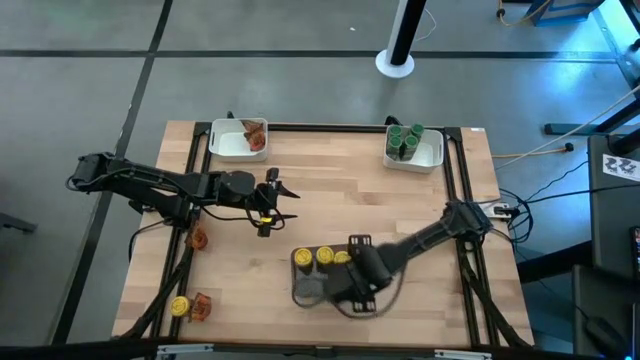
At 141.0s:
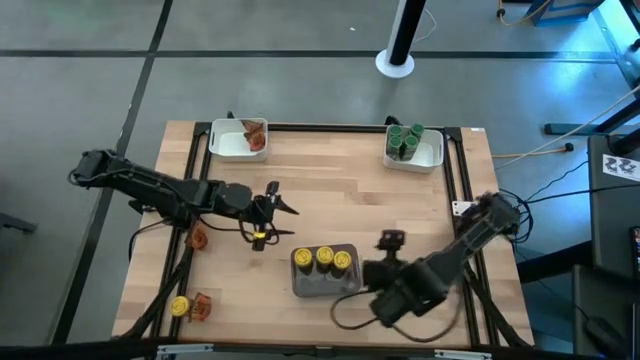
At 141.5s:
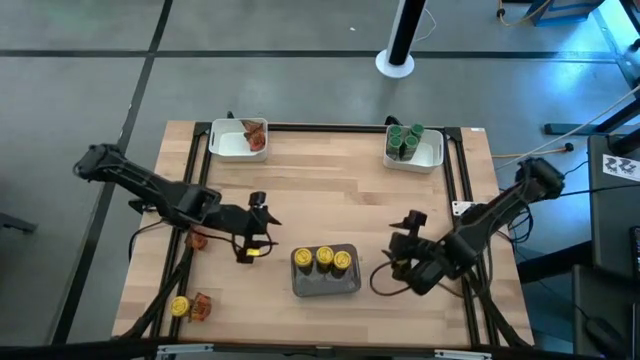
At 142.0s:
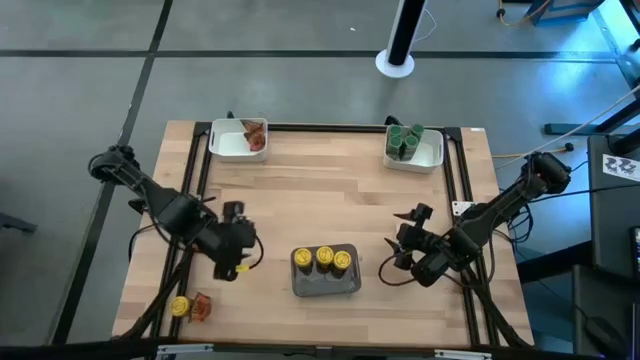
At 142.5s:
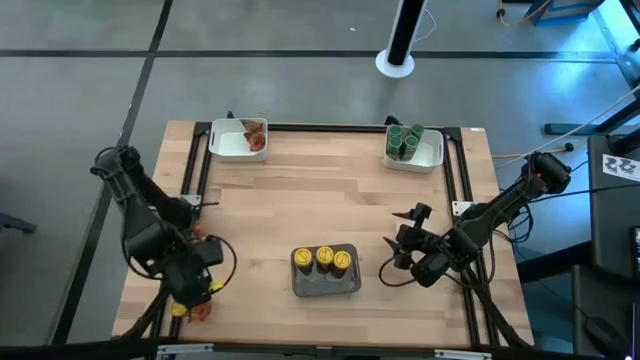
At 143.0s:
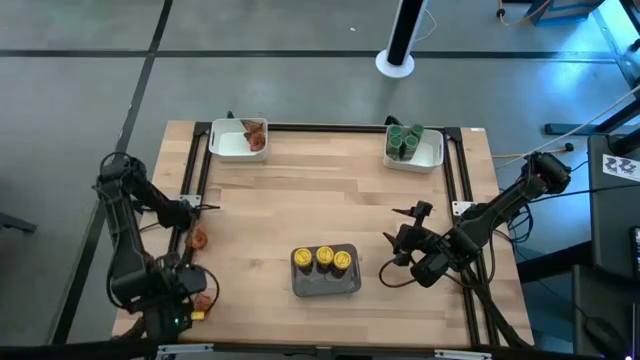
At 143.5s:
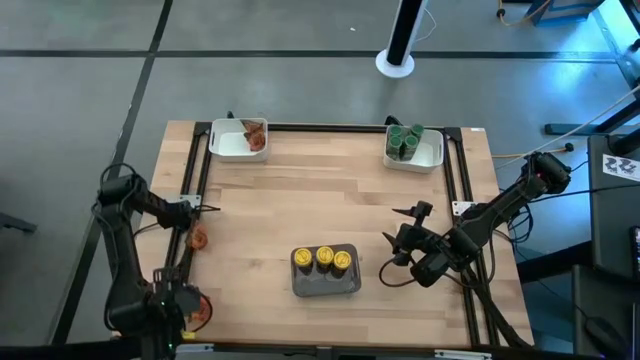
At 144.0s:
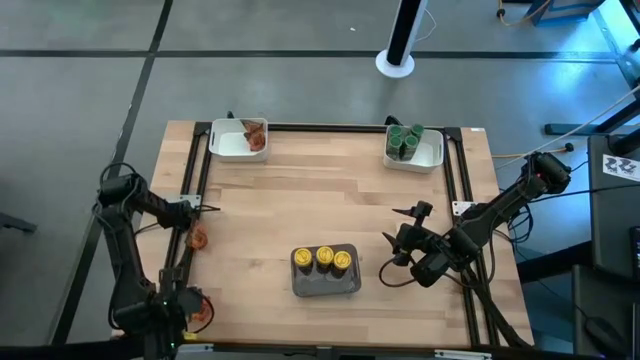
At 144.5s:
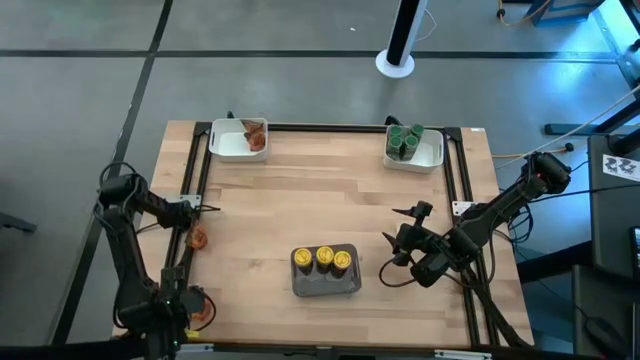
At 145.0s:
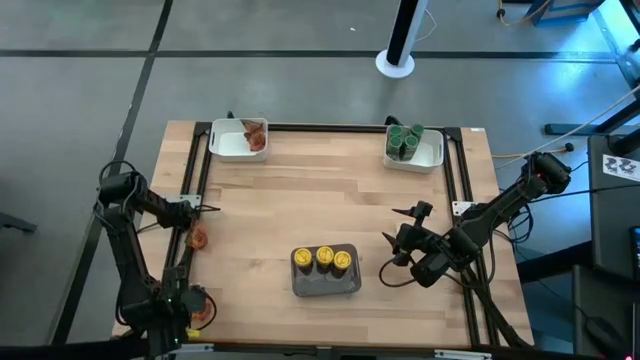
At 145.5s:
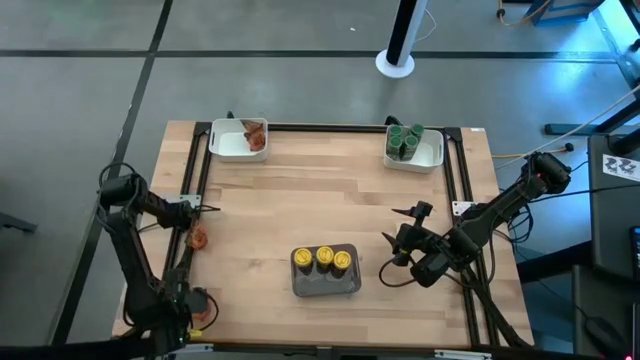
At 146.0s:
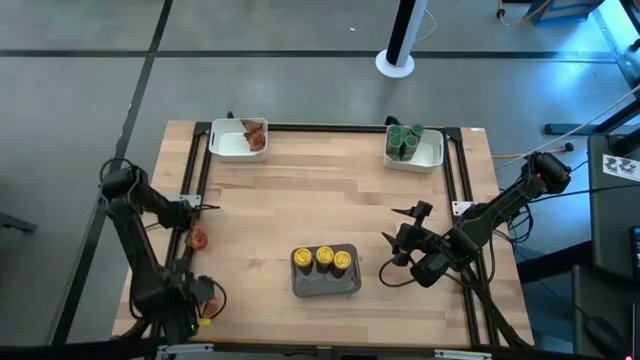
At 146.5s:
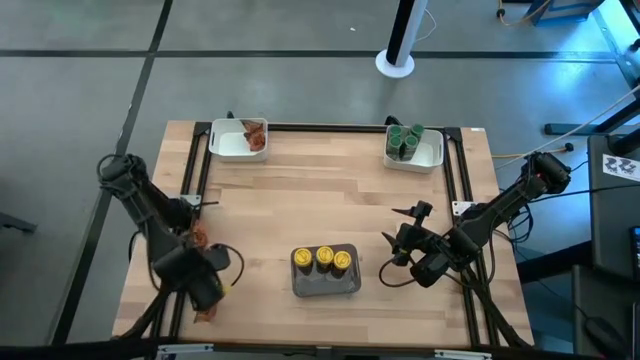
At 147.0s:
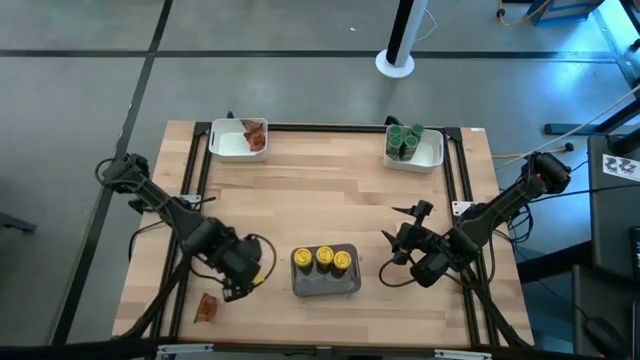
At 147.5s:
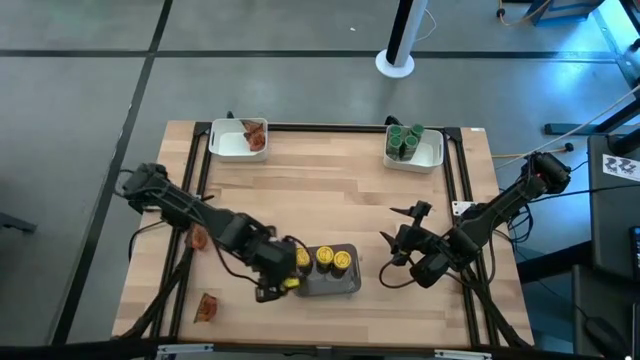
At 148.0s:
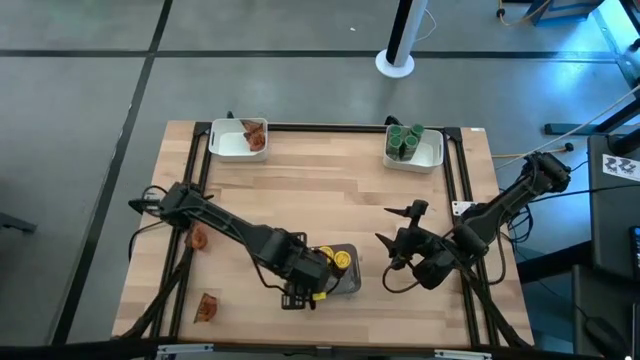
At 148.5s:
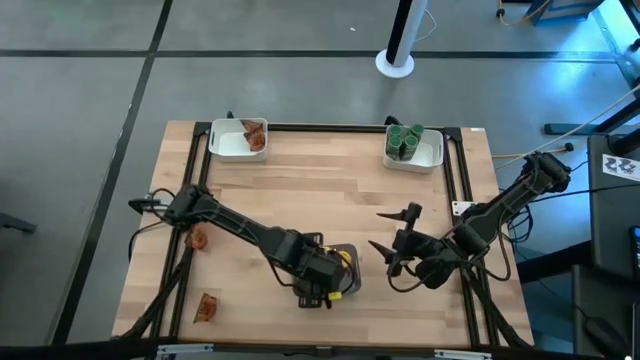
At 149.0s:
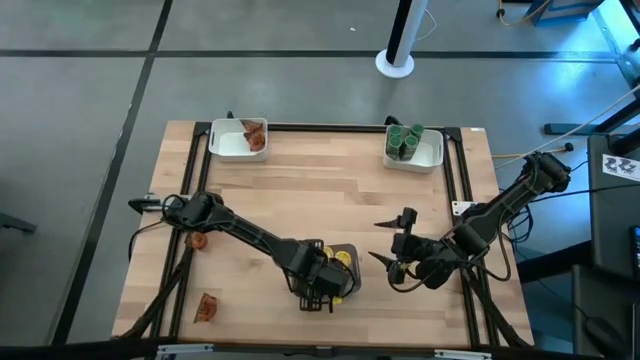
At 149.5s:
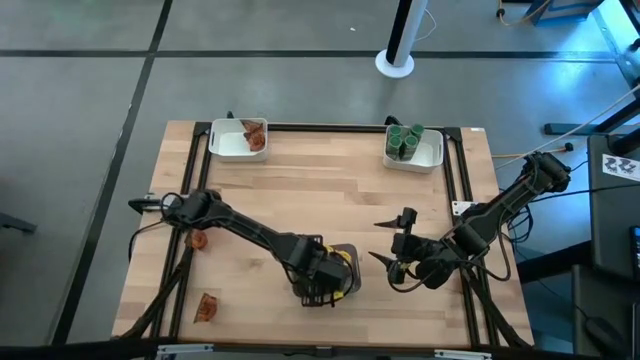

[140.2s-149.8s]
Task: Sort spices by type
Put the yellow seasoning bottle into the black bin

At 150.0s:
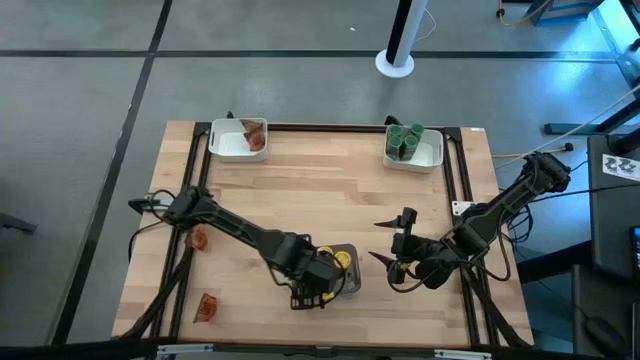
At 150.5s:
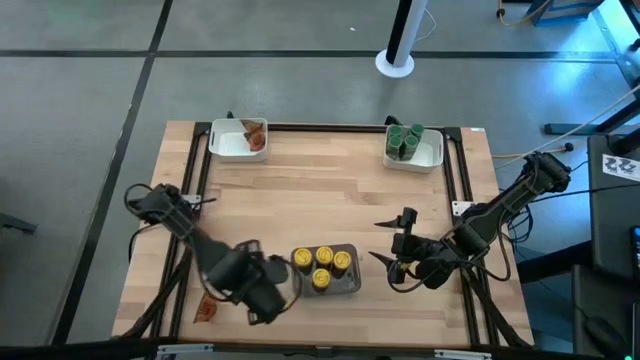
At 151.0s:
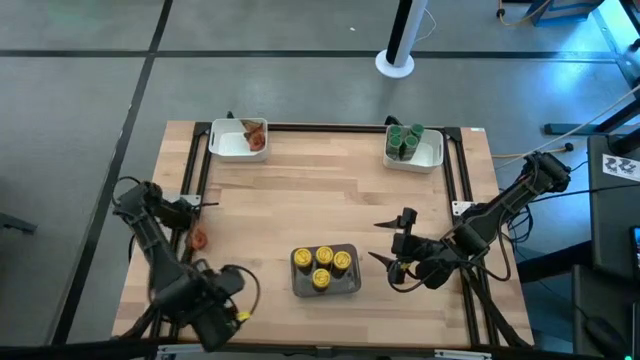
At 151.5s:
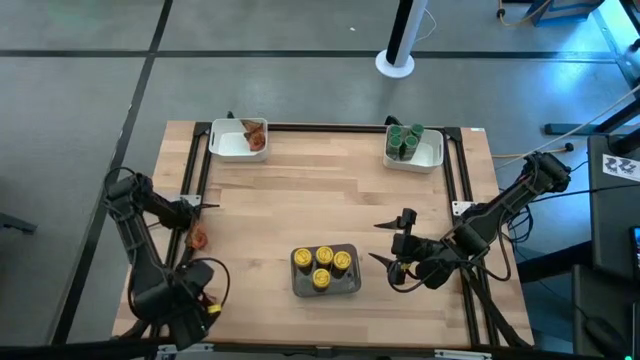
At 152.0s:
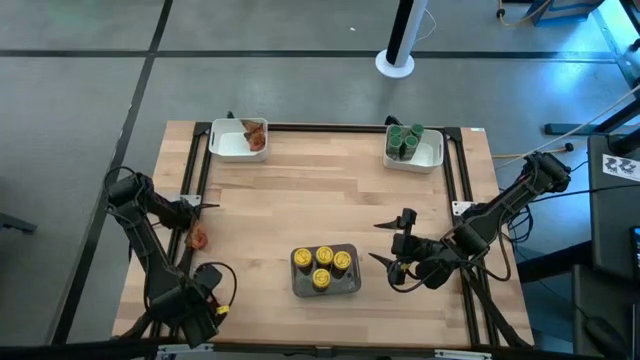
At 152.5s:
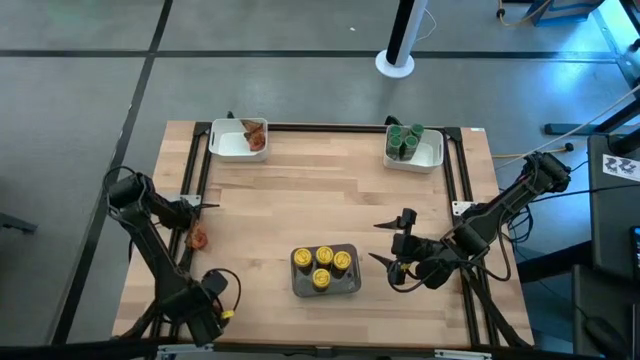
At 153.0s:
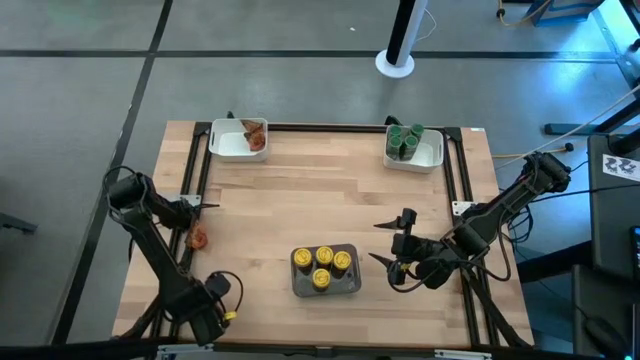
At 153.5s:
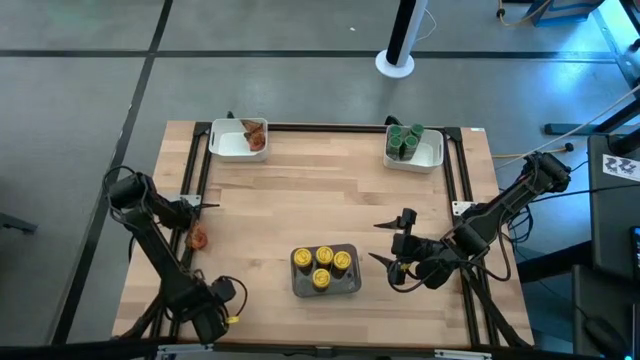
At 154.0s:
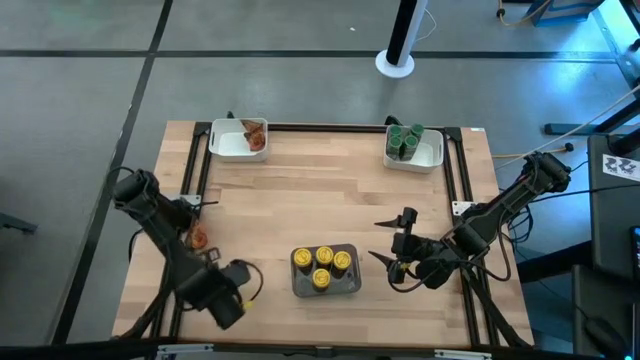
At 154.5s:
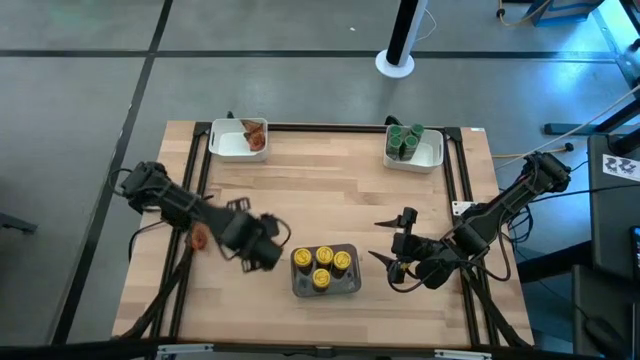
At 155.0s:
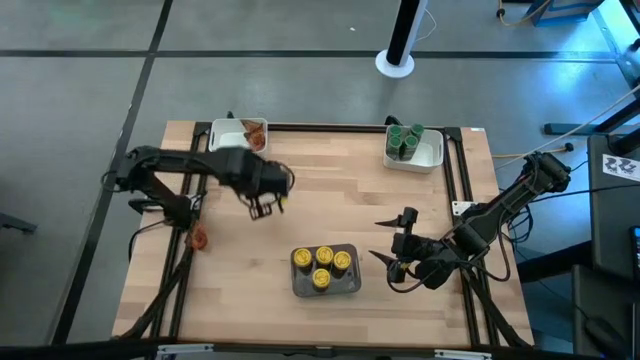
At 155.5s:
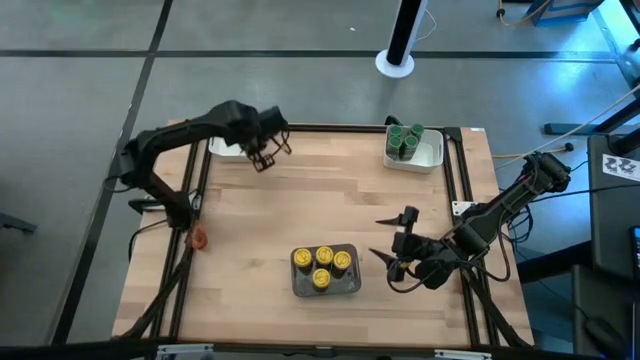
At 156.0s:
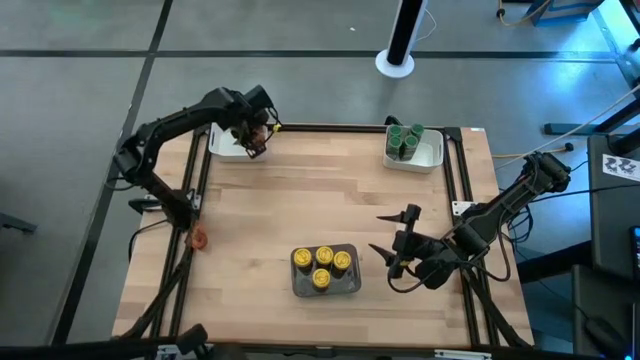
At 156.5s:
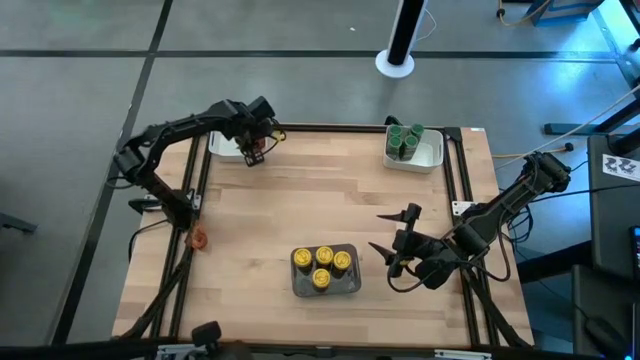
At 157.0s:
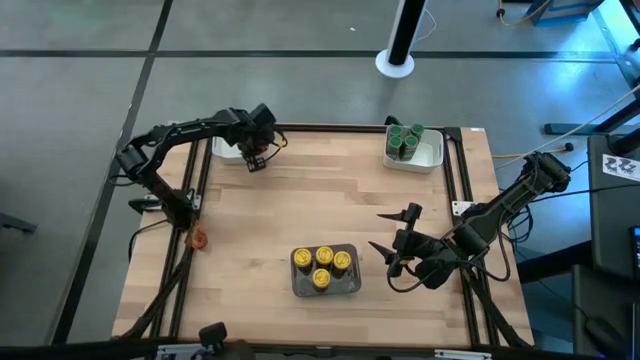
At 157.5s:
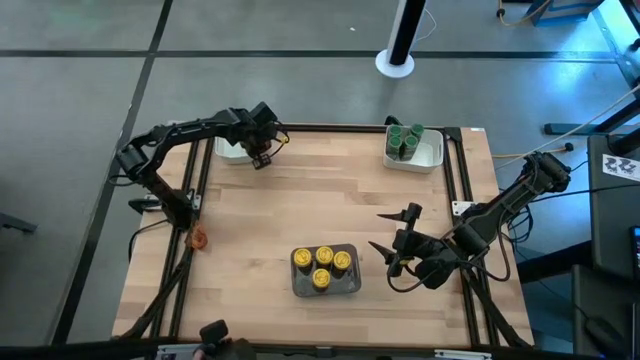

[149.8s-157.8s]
Put the bottom orange seasoning bag into the left white bin

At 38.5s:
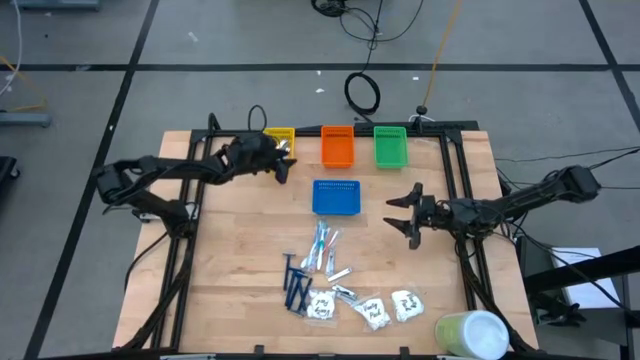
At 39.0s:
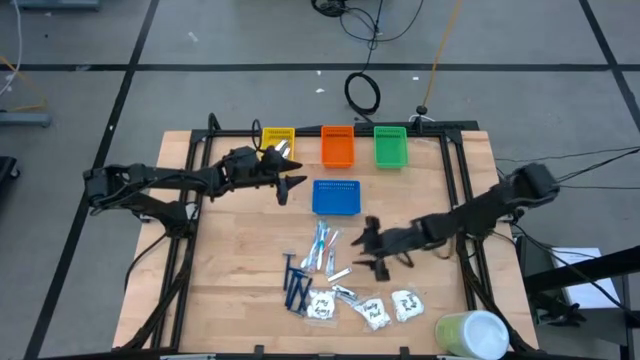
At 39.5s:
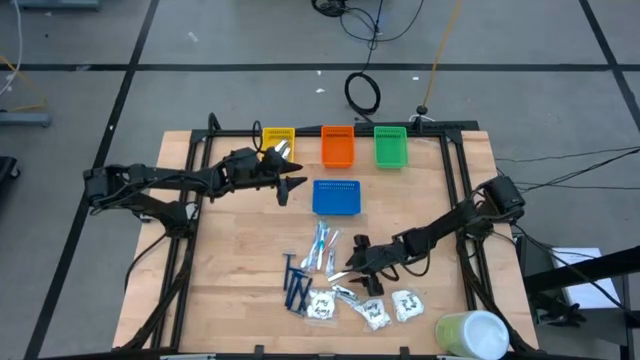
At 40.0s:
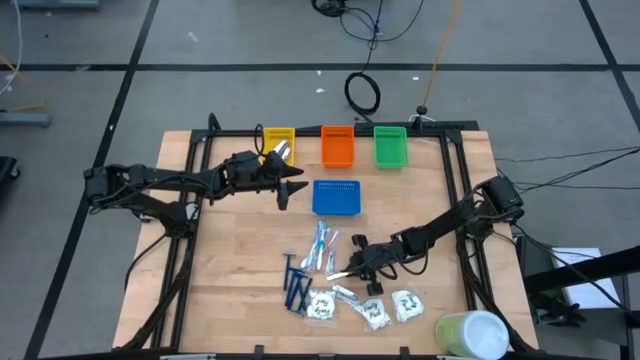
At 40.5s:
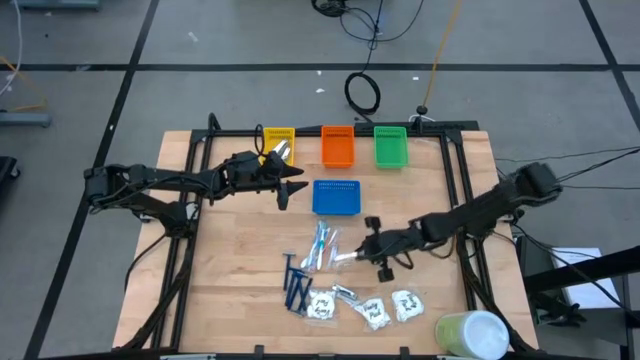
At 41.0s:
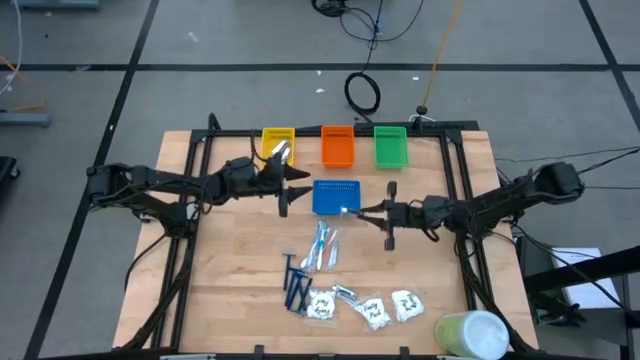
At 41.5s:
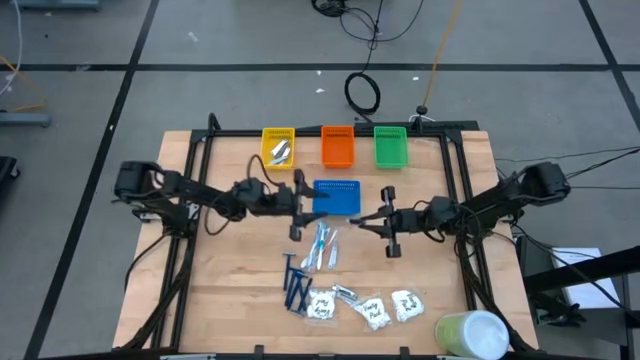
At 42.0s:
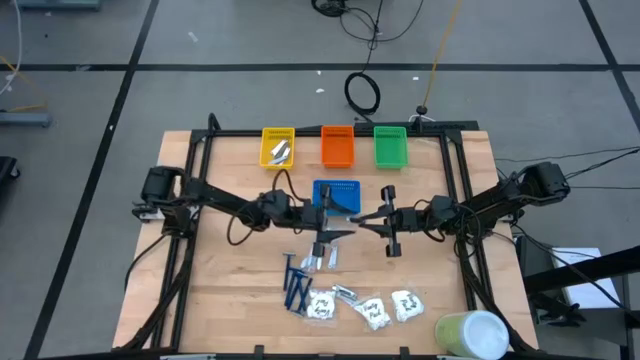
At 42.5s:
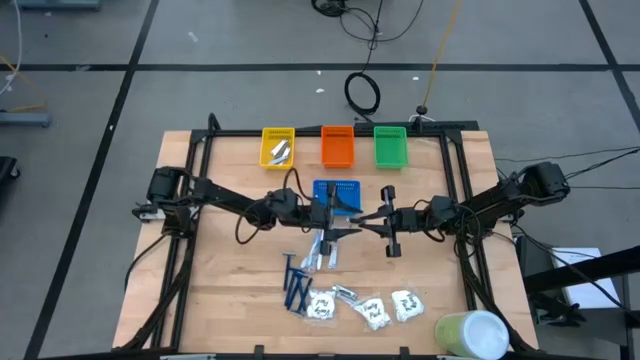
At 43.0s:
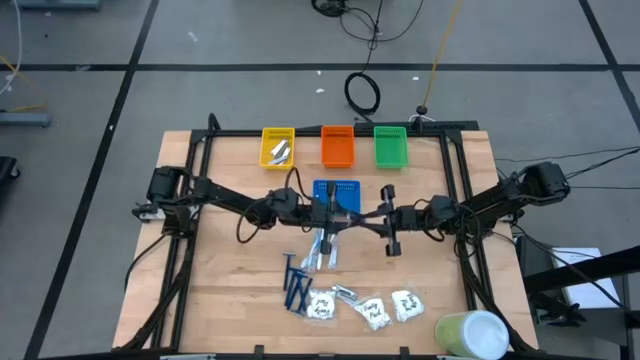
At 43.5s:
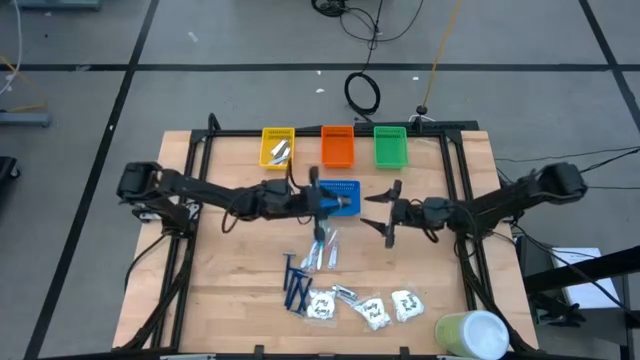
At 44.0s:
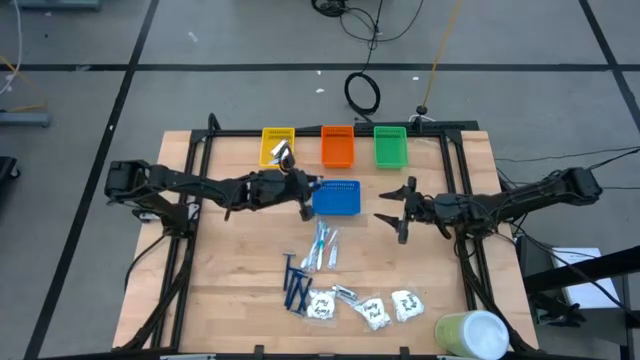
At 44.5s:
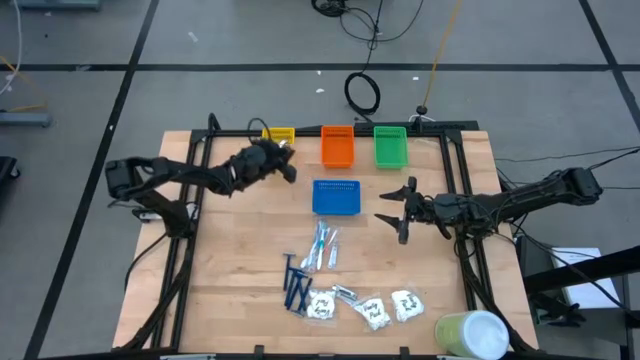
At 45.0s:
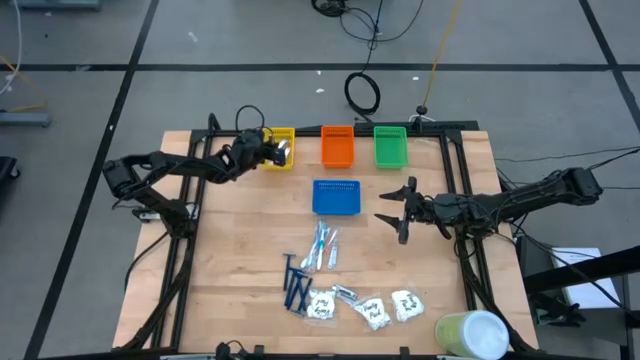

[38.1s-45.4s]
Task: Pick & Place Travel size toiletries
Put the silver nail cutter into the yellow basket
